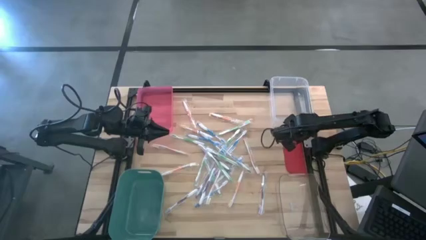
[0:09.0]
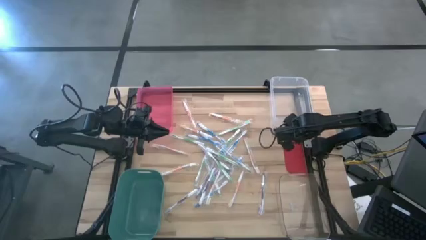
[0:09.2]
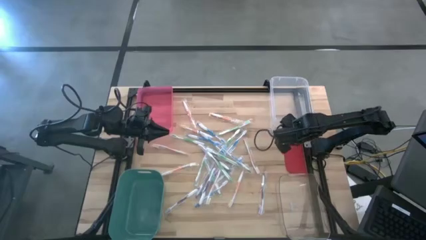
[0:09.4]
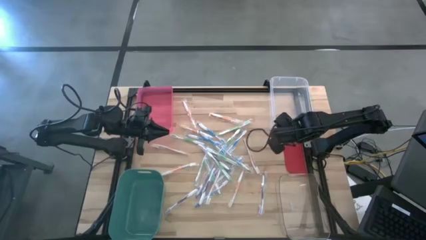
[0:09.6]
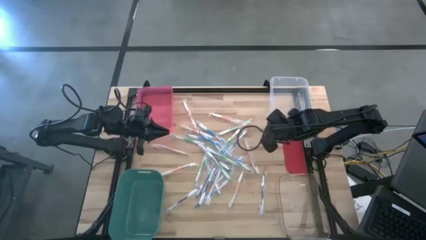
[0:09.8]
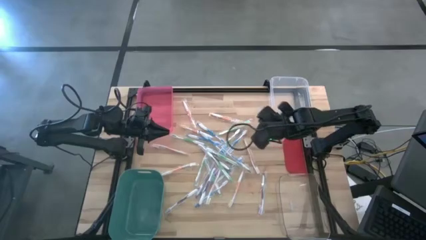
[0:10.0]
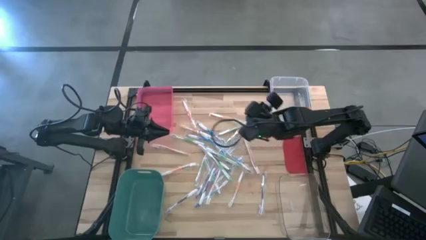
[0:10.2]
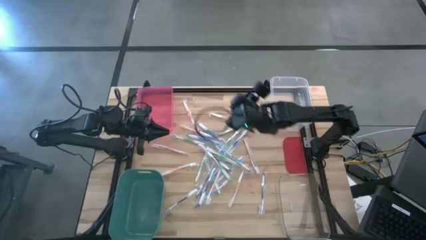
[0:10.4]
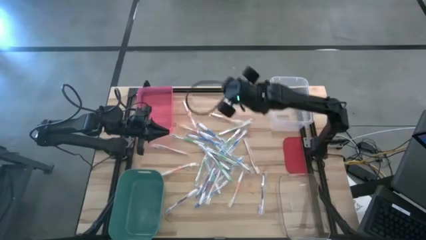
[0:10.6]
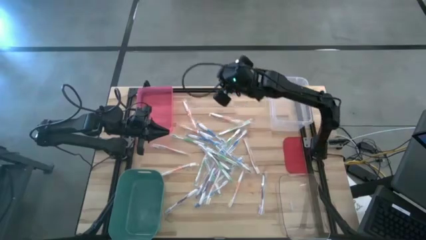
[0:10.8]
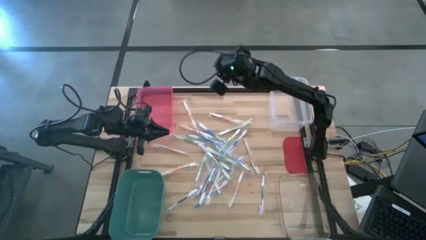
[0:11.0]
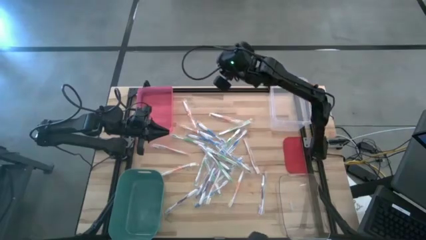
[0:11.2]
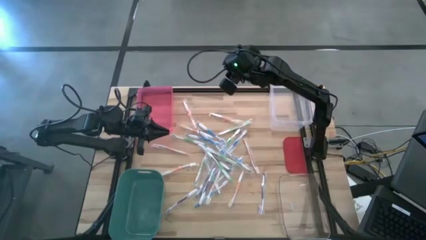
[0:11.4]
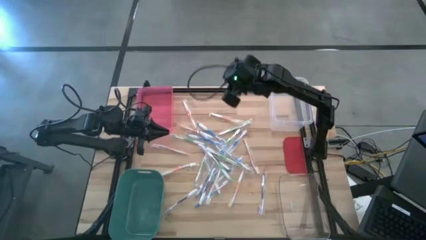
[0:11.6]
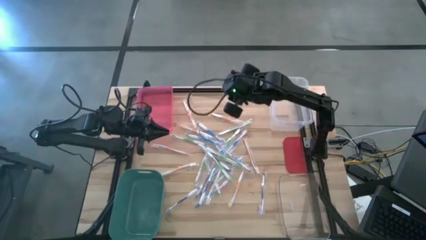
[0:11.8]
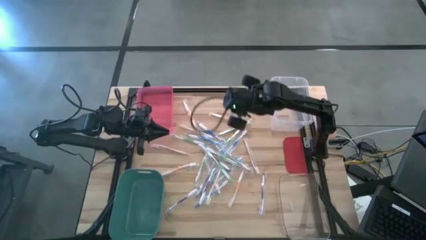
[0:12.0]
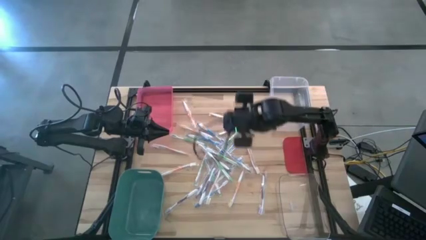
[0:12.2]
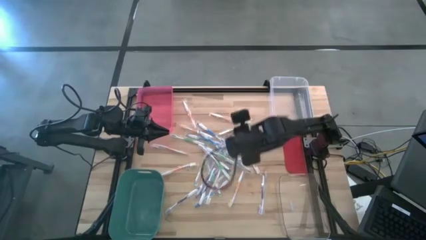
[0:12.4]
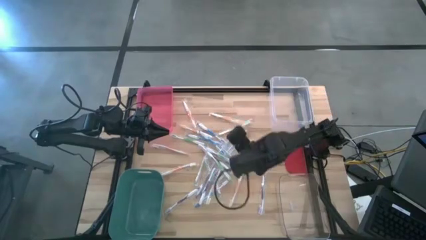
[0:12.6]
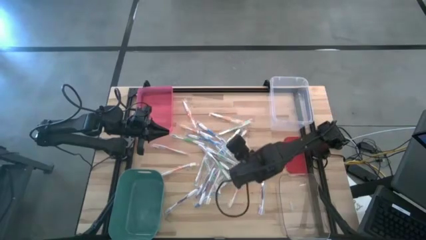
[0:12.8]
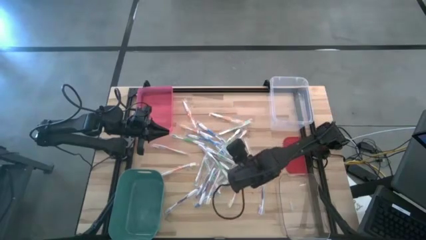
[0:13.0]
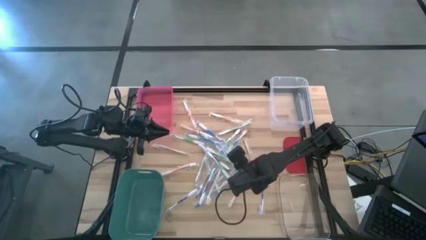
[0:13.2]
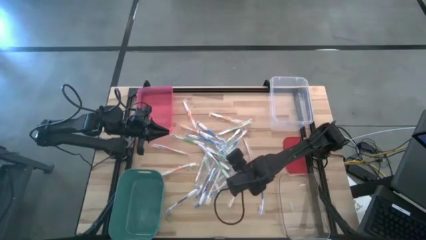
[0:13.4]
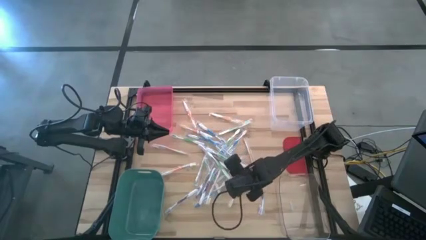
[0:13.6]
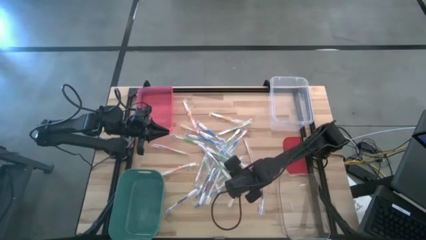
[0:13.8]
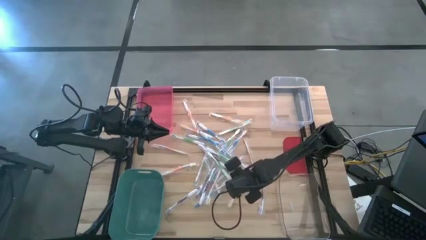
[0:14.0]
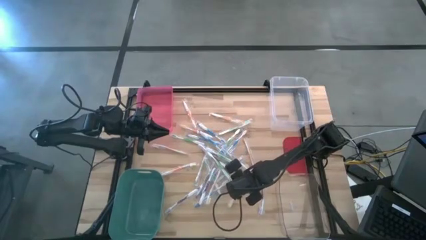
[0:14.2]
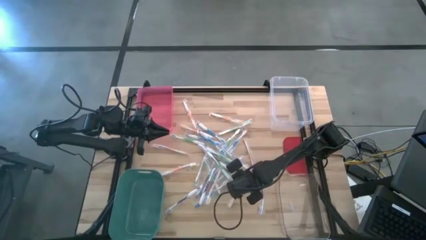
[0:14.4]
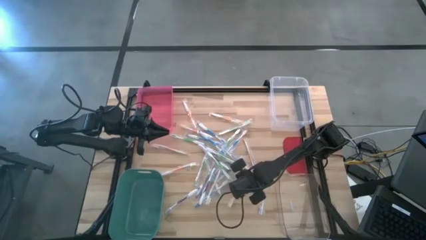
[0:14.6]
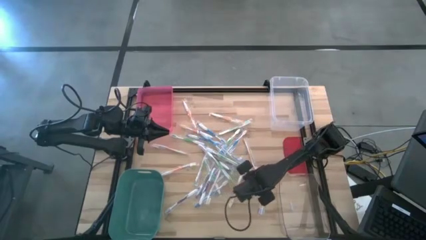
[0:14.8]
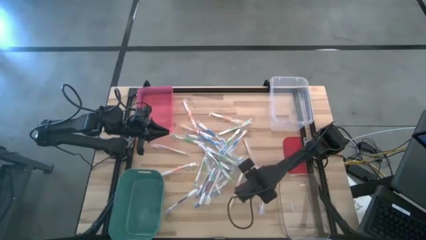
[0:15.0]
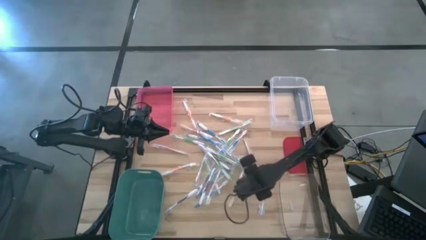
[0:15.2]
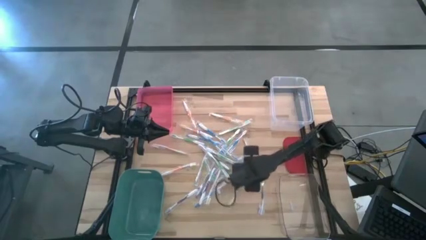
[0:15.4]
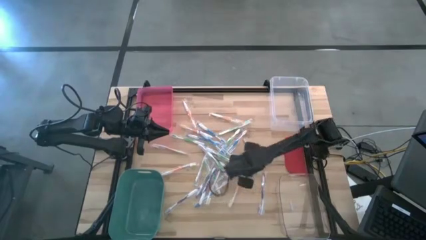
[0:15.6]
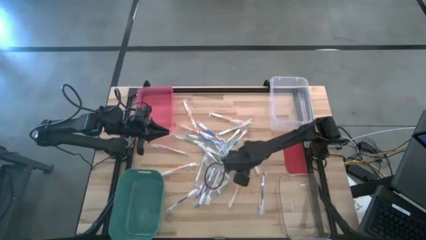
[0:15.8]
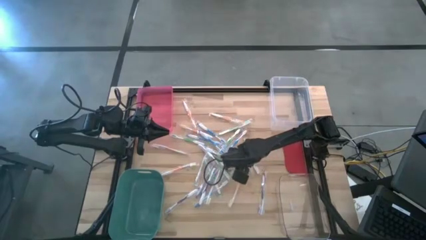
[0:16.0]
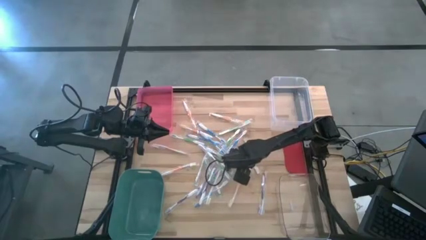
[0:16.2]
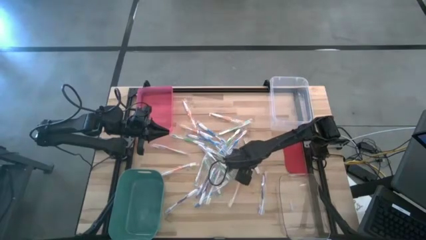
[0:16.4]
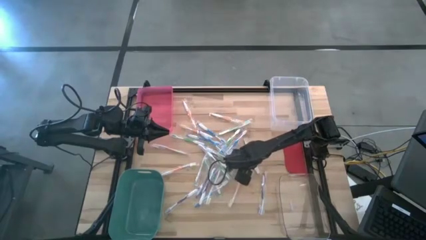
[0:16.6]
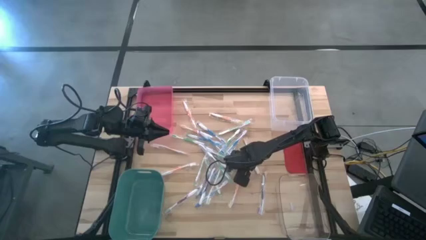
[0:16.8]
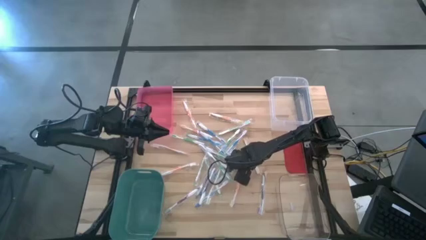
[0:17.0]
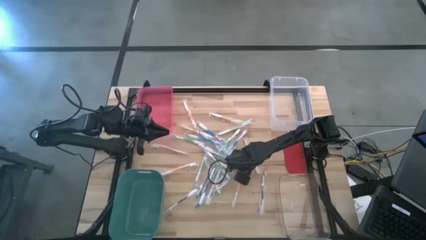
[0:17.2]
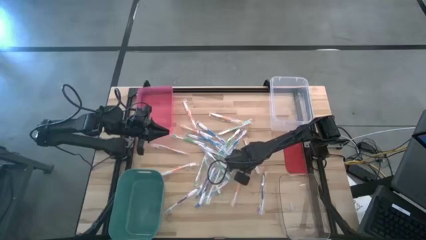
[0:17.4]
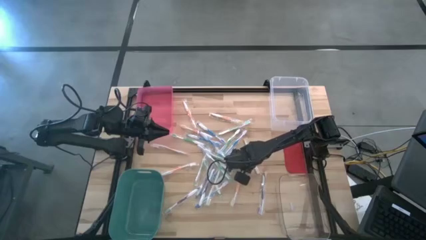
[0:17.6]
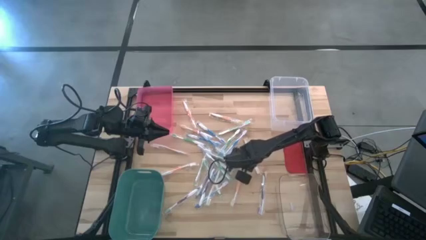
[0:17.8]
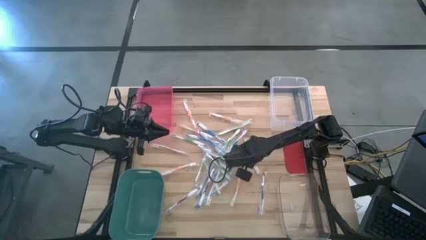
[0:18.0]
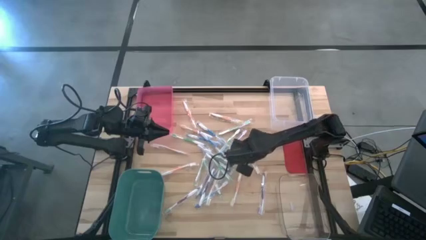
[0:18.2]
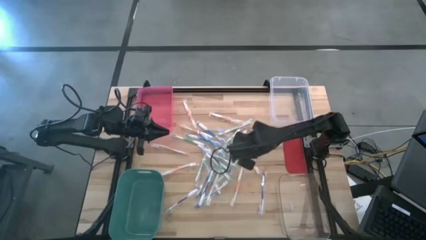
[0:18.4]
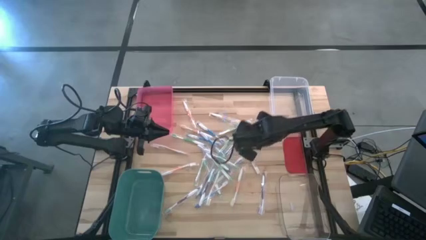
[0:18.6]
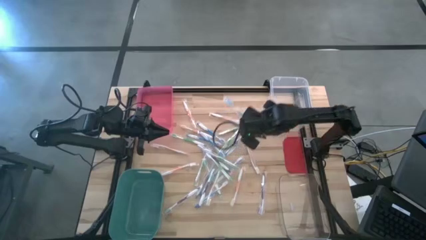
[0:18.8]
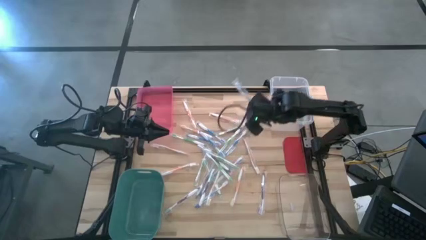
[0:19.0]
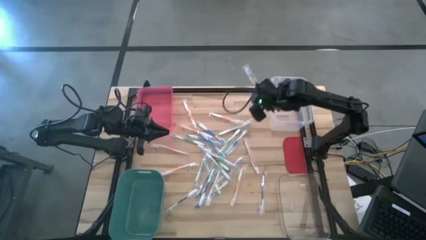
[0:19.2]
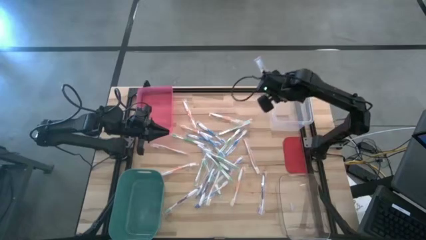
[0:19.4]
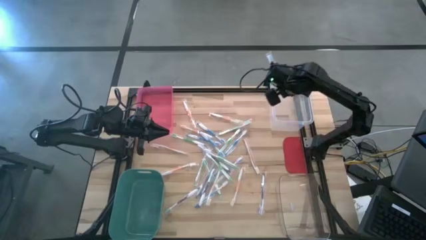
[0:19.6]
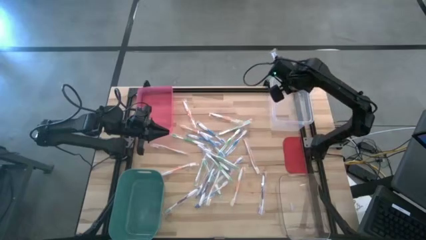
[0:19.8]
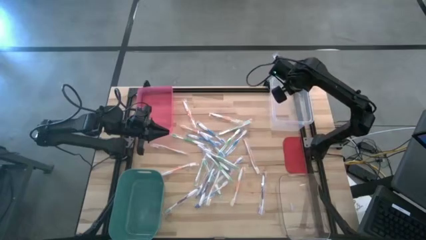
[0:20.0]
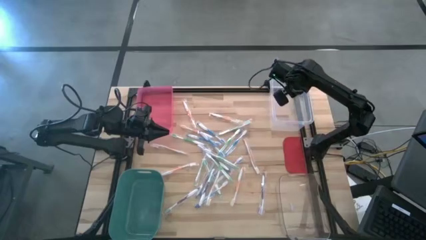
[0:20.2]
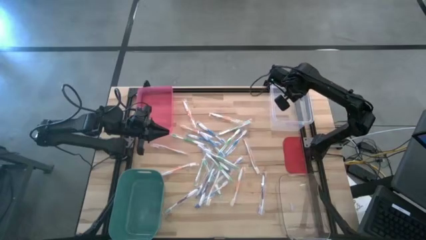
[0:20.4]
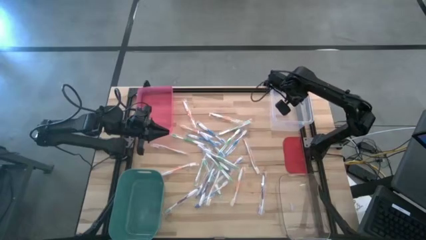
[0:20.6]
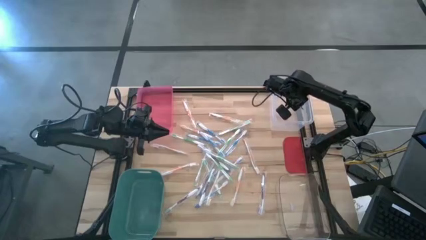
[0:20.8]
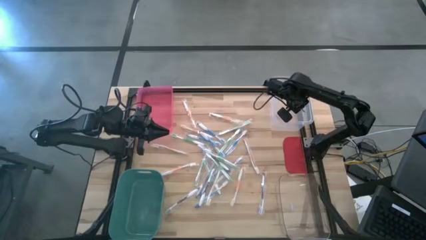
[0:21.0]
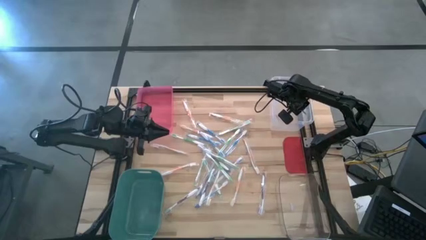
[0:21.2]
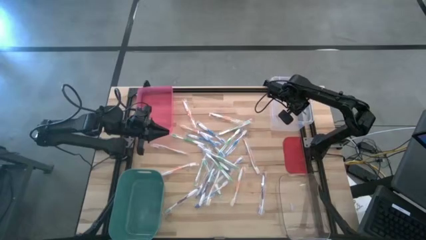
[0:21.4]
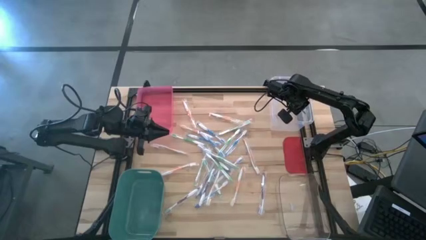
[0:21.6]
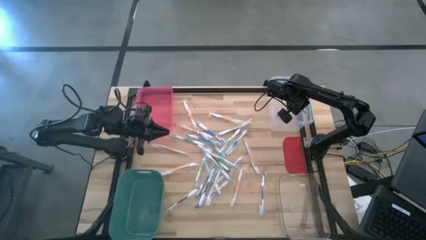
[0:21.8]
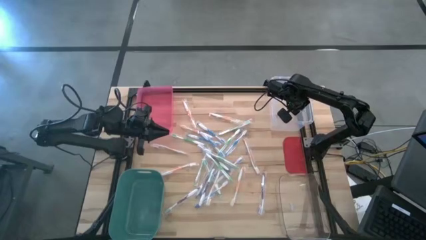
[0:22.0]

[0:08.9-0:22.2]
Task: Pick & Place Toothbrushes
Put the blue toothbrush into the top transparent bin
